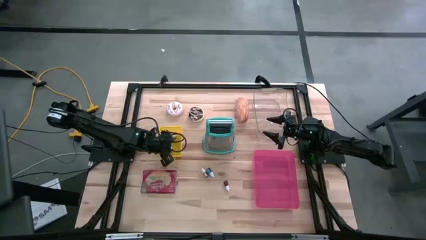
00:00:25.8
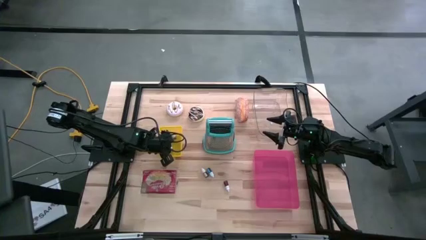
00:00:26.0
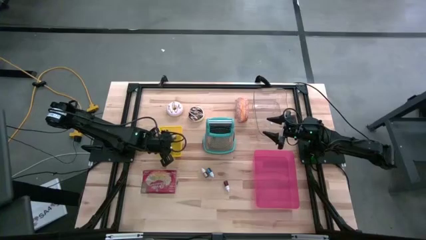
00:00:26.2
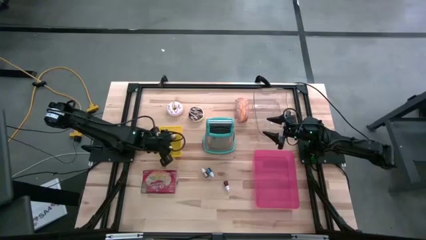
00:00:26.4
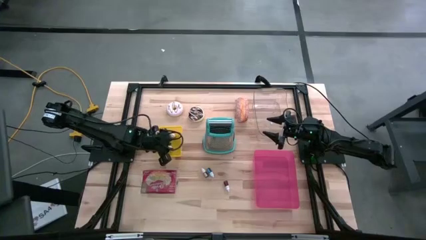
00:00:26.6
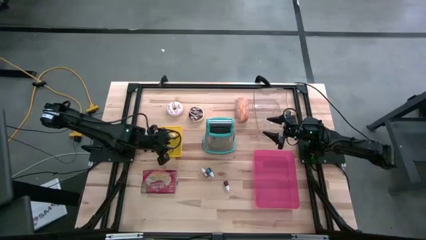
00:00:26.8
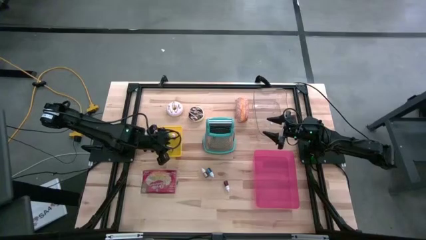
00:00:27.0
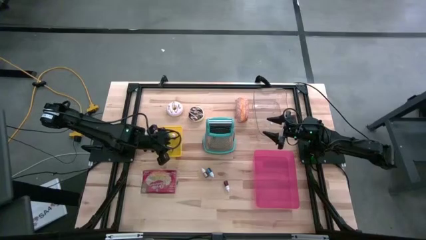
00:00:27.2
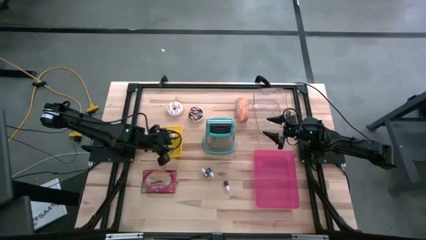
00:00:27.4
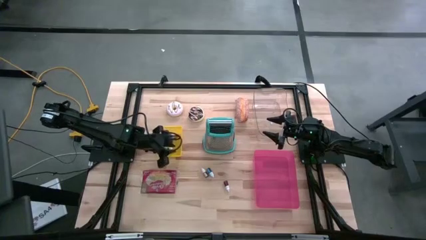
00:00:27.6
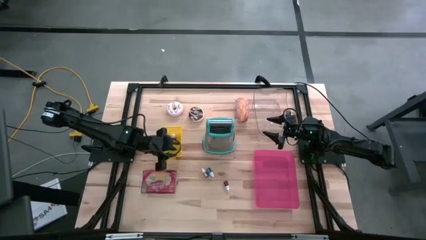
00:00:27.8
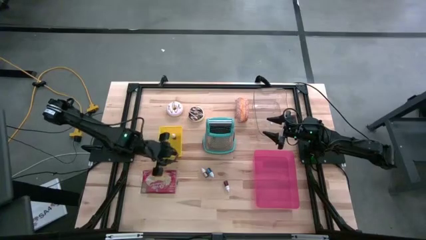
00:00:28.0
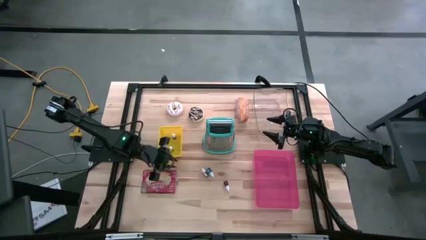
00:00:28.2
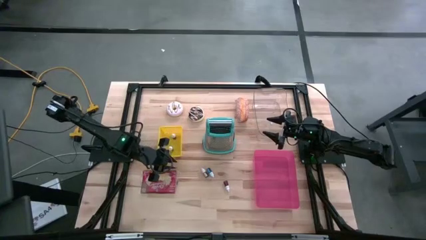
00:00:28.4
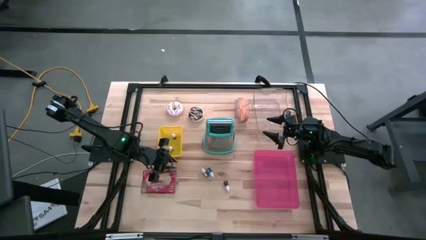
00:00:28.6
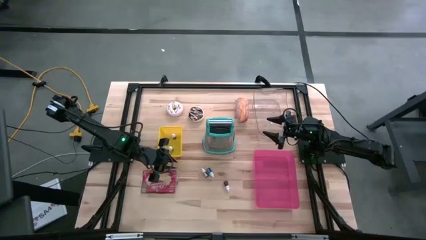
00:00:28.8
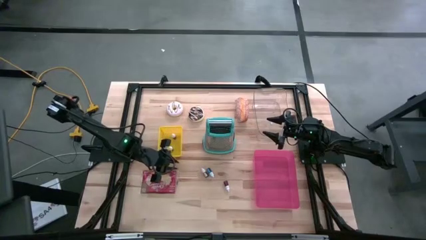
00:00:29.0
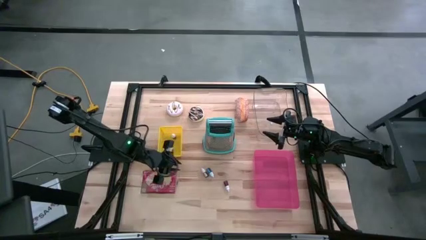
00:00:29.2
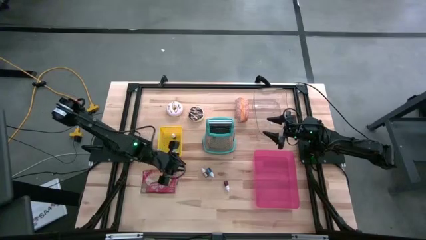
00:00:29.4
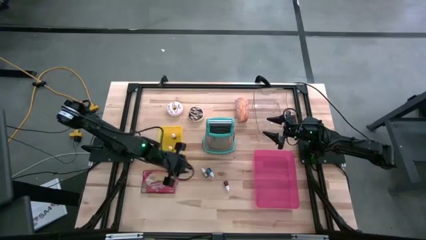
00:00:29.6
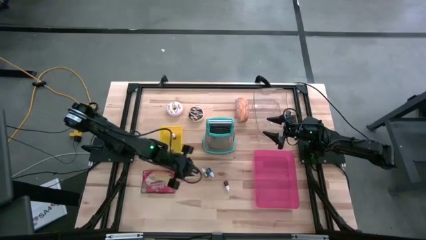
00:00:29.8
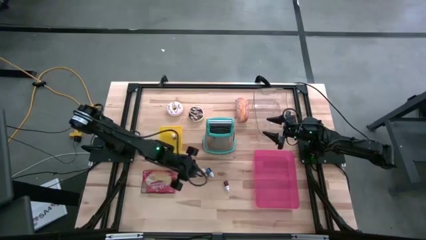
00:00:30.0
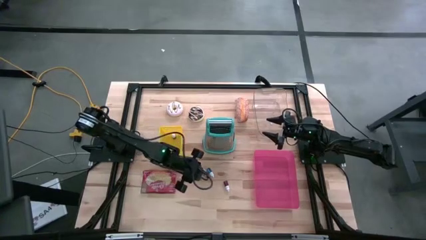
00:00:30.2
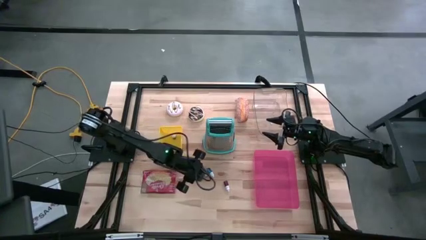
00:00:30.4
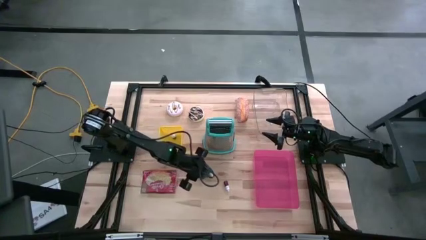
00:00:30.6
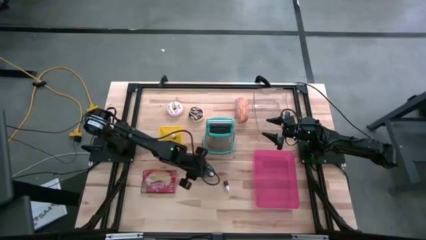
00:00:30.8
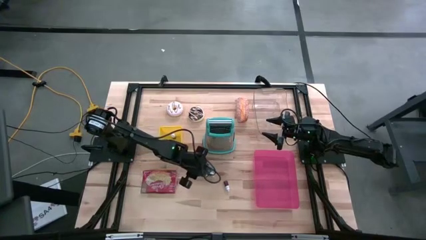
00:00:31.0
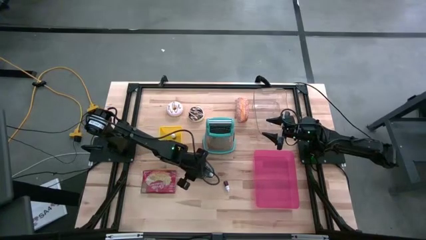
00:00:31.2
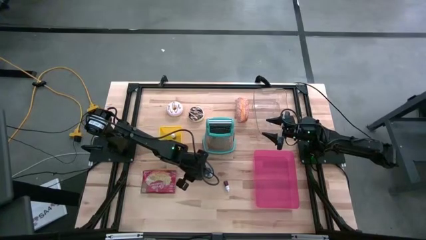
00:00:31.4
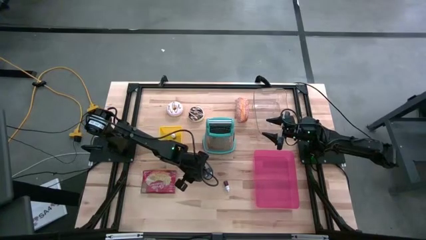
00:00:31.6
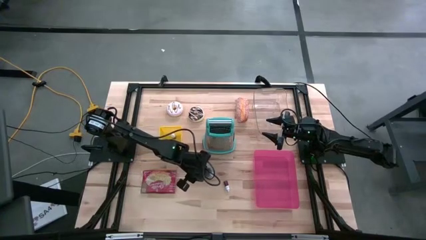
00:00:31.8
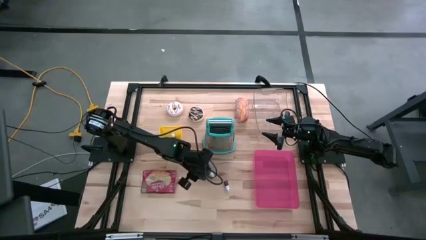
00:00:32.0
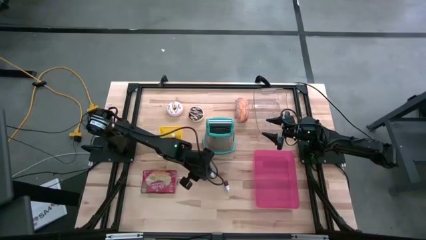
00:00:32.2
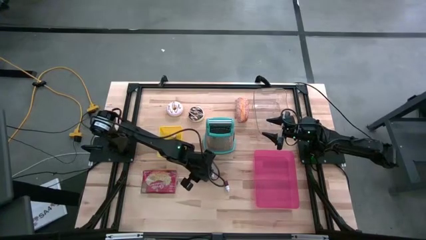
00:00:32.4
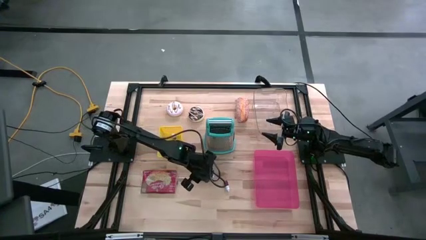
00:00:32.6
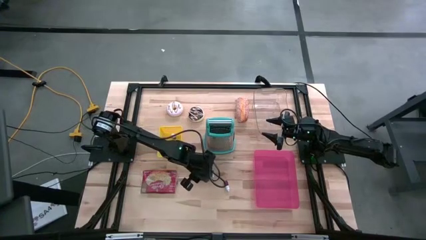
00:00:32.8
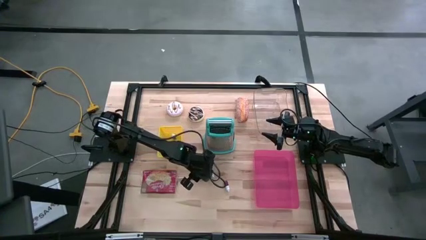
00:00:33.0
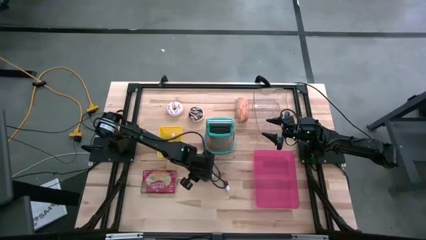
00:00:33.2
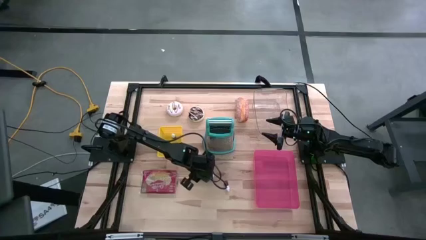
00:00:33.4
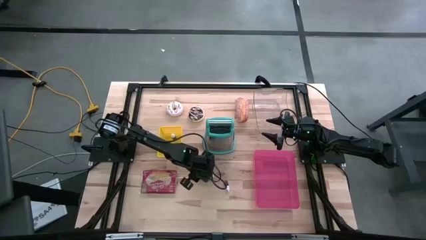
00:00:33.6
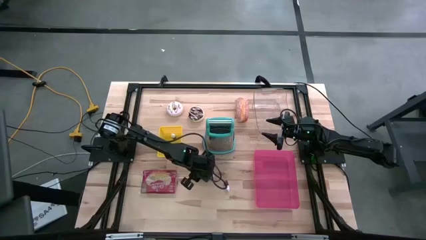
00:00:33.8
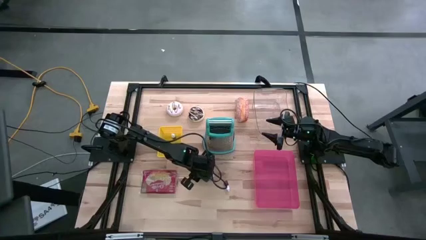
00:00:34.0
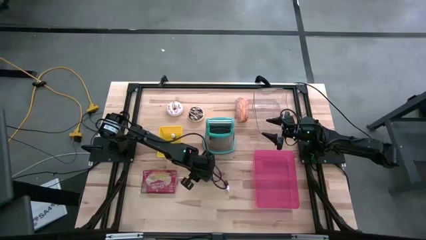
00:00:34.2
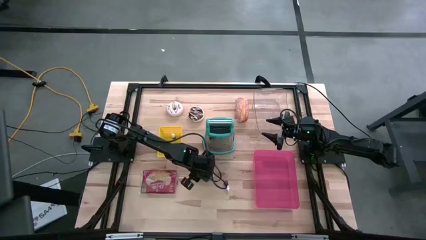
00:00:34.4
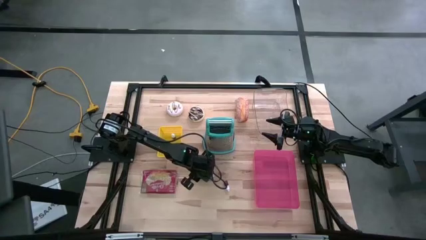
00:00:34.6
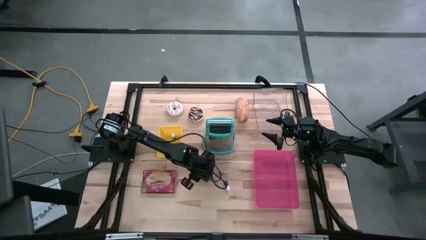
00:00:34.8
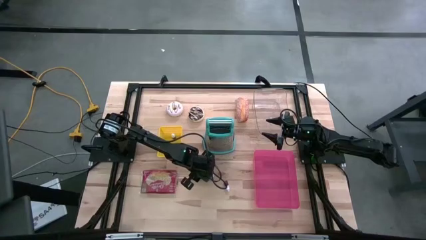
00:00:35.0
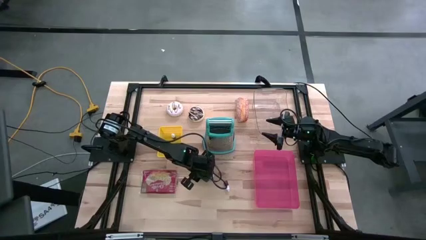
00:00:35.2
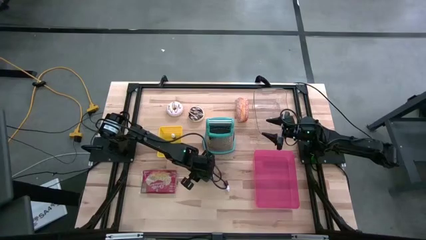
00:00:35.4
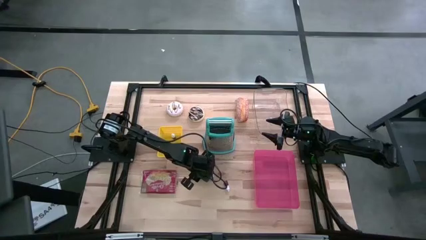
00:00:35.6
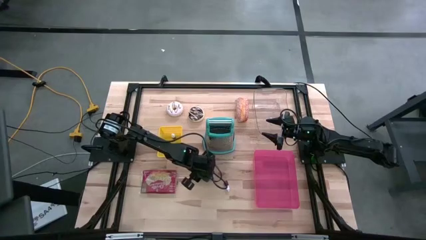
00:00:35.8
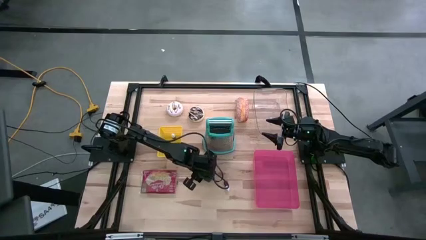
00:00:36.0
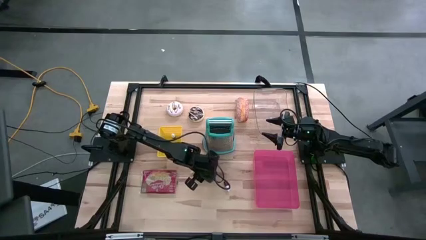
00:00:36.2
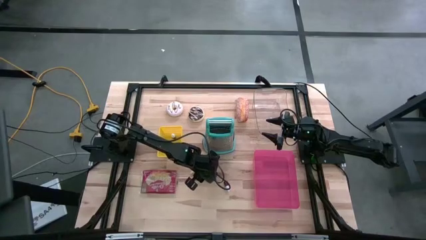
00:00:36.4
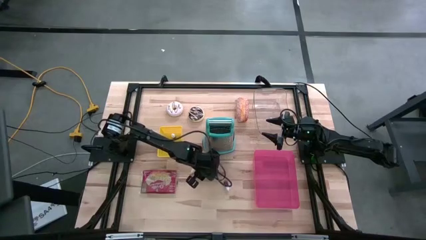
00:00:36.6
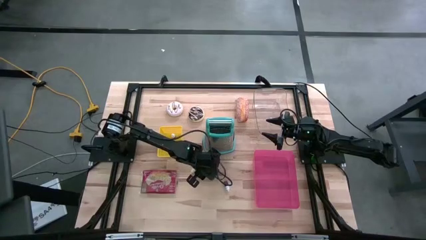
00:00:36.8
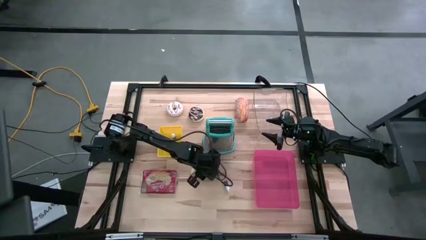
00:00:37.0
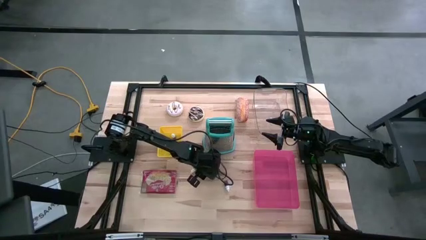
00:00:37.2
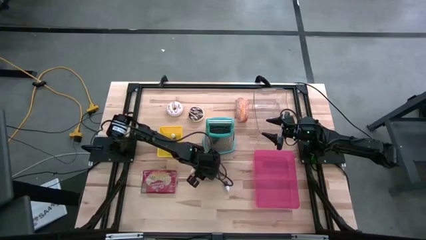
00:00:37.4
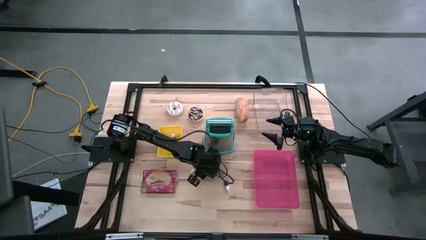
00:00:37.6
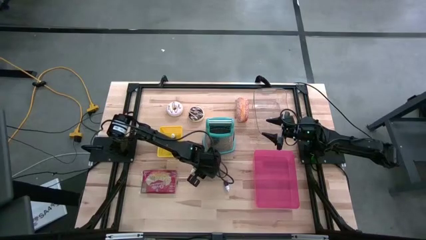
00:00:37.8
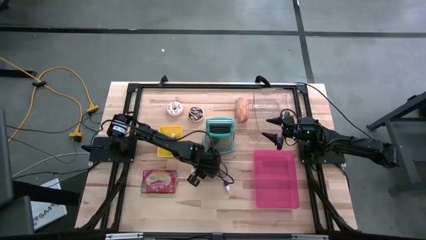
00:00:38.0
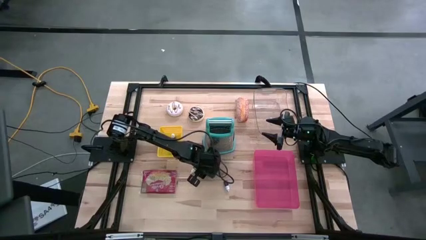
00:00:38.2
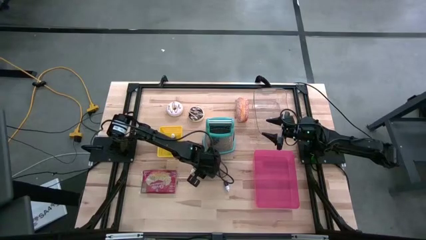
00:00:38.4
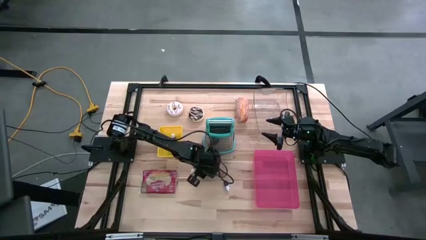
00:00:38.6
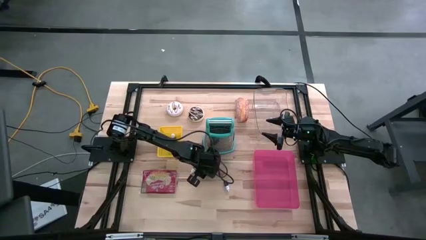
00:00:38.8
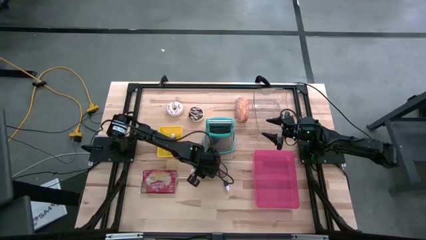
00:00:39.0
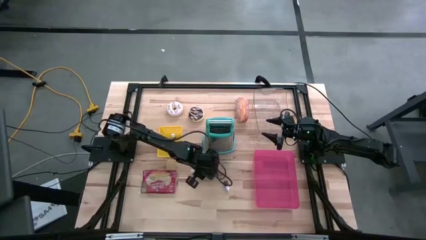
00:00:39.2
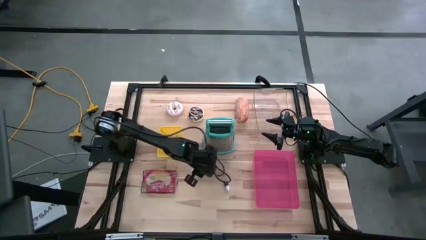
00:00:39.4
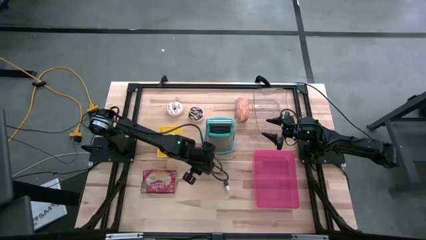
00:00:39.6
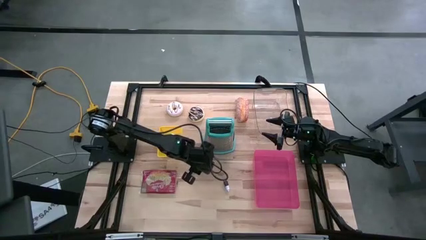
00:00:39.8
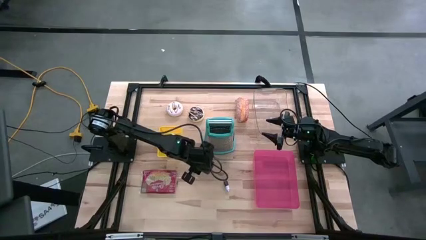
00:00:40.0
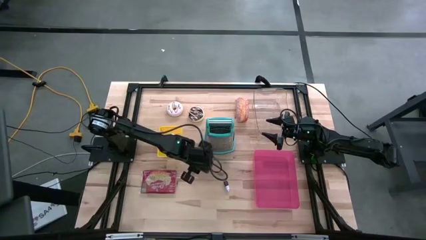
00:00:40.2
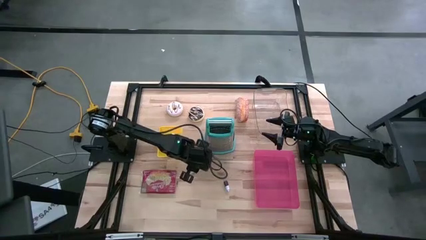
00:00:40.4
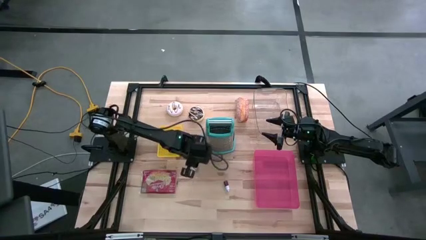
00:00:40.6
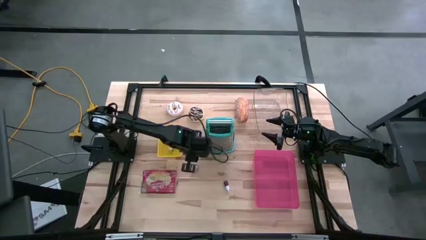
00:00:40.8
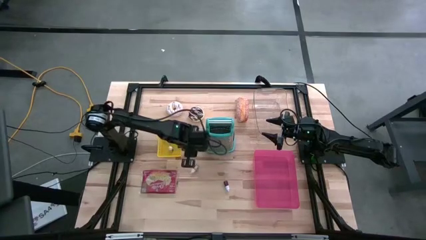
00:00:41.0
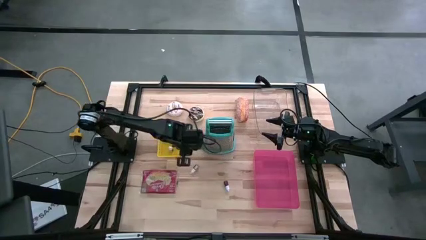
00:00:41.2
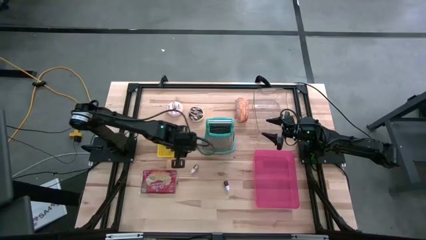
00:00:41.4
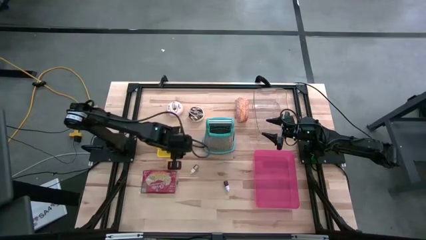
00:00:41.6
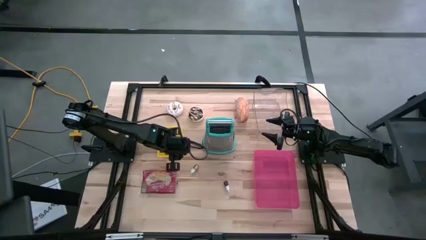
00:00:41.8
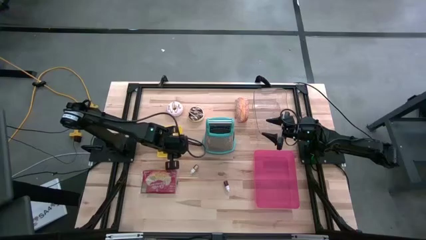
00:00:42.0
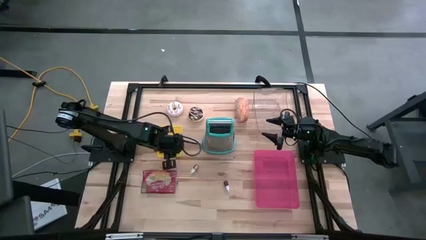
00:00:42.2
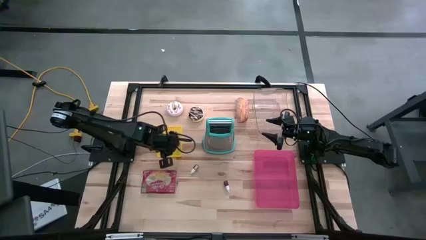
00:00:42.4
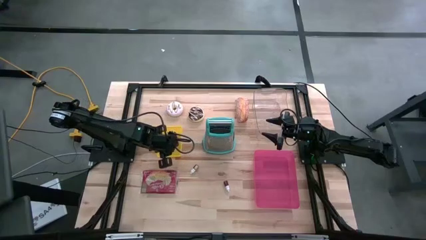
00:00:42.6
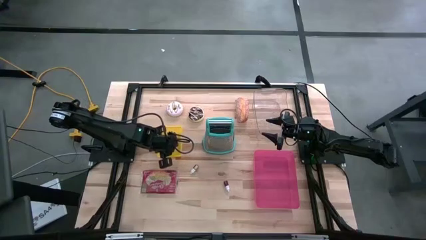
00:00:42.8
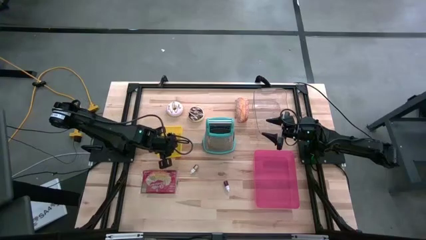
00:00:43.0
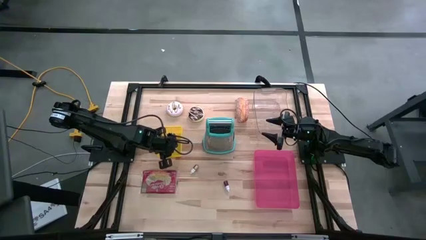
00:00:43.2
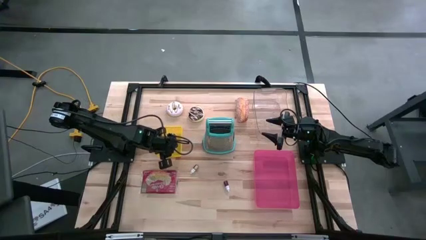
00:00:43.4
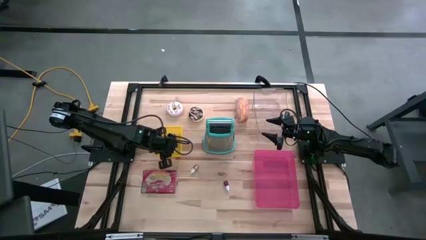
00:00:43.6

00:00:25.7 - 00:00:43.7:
Put the blue food coloring bottle into the yellow bin
